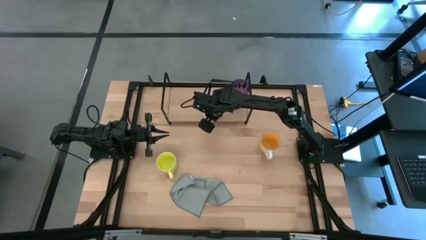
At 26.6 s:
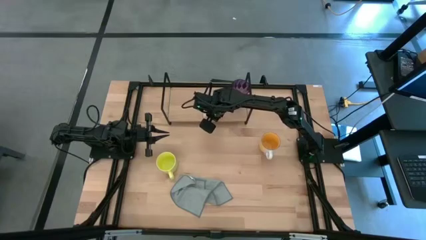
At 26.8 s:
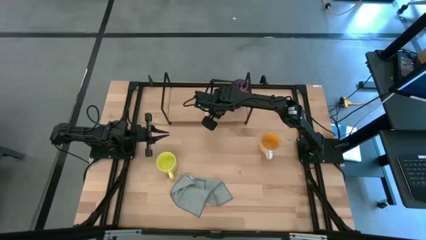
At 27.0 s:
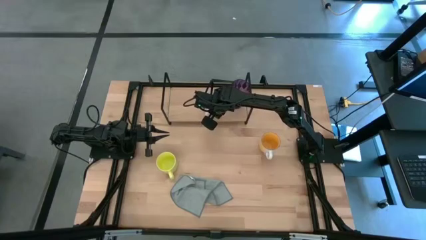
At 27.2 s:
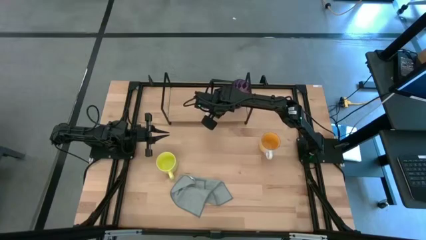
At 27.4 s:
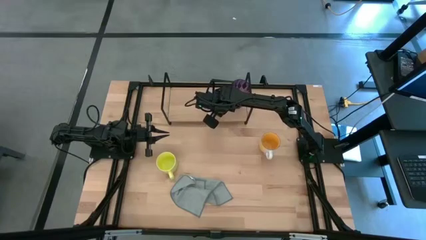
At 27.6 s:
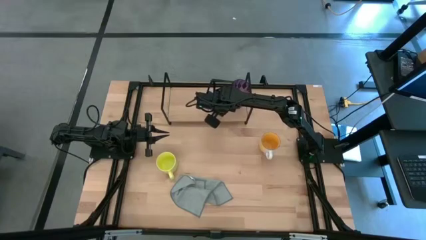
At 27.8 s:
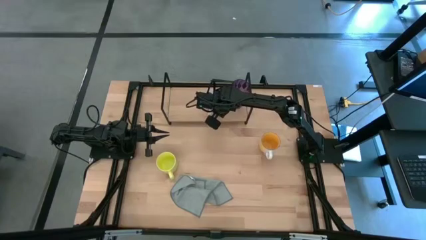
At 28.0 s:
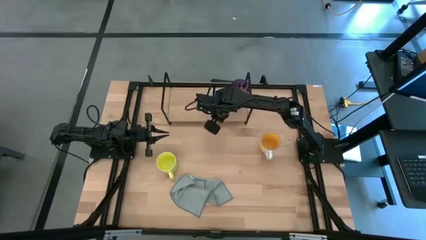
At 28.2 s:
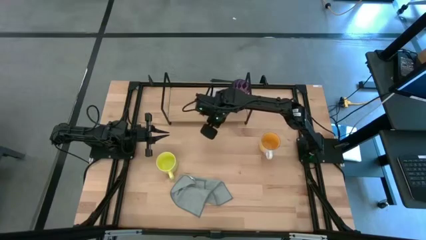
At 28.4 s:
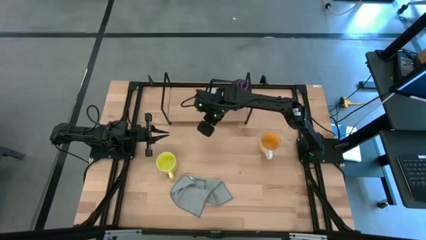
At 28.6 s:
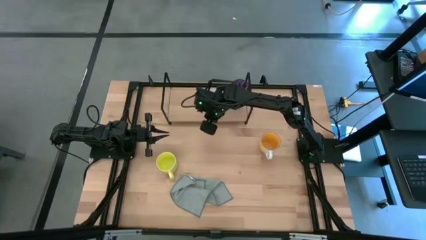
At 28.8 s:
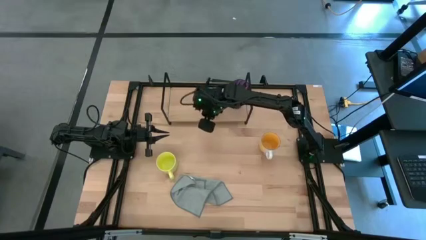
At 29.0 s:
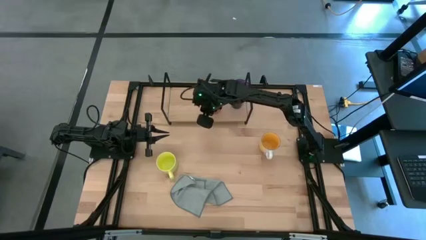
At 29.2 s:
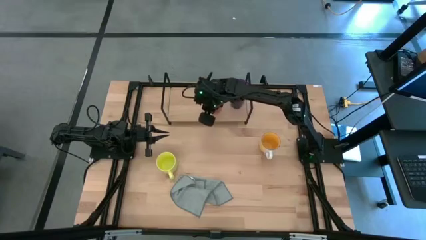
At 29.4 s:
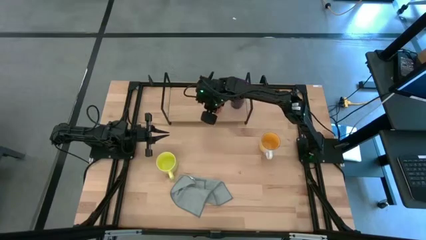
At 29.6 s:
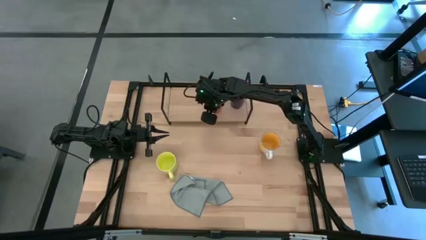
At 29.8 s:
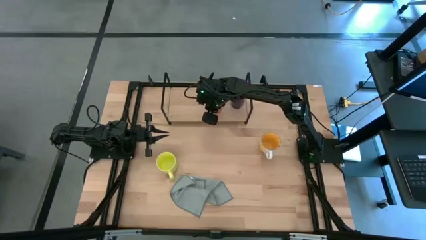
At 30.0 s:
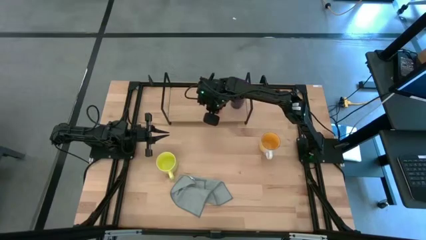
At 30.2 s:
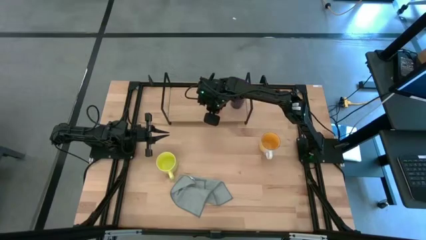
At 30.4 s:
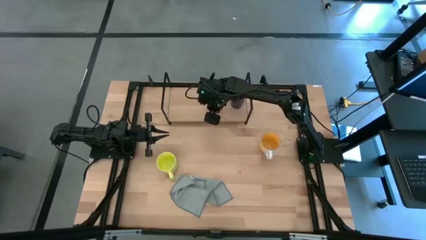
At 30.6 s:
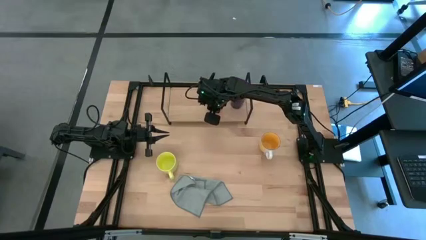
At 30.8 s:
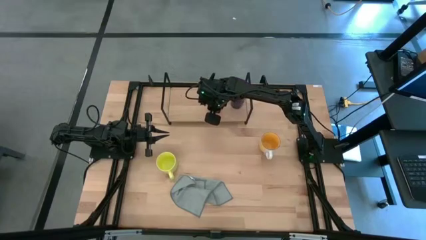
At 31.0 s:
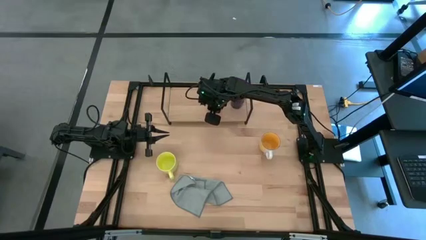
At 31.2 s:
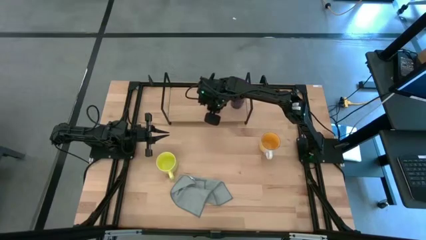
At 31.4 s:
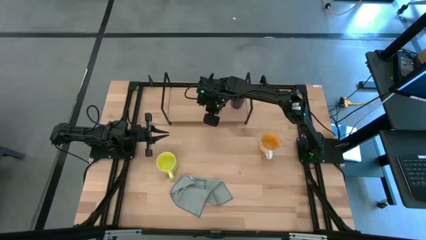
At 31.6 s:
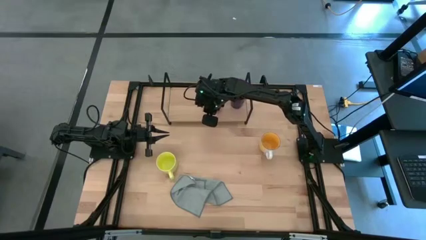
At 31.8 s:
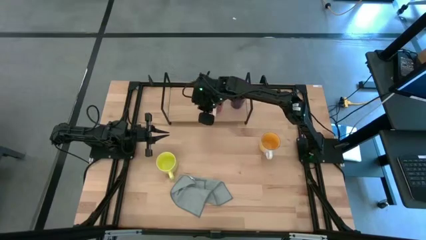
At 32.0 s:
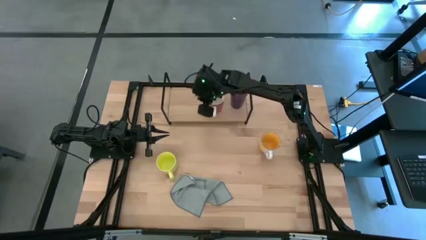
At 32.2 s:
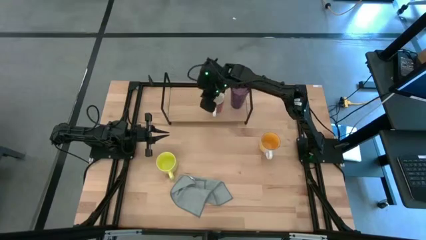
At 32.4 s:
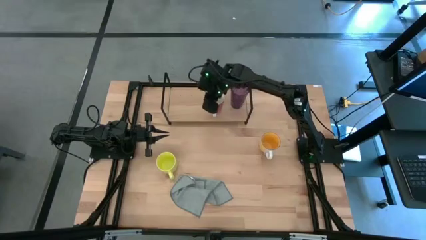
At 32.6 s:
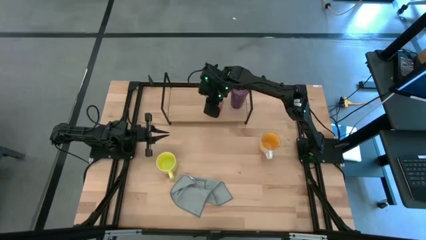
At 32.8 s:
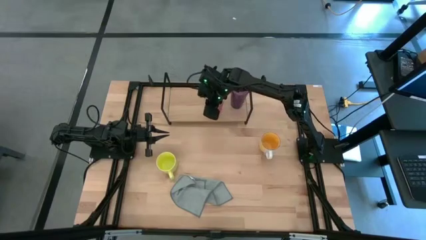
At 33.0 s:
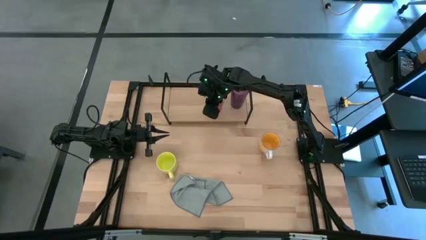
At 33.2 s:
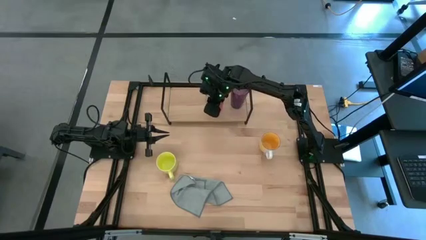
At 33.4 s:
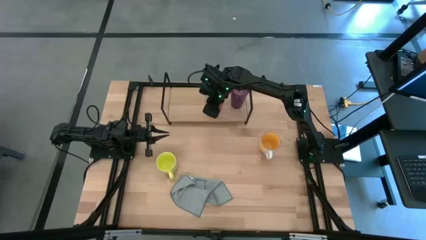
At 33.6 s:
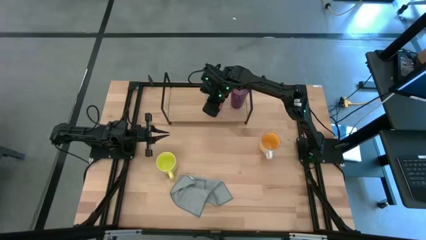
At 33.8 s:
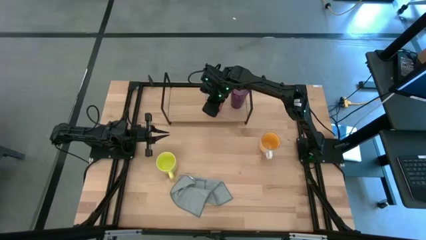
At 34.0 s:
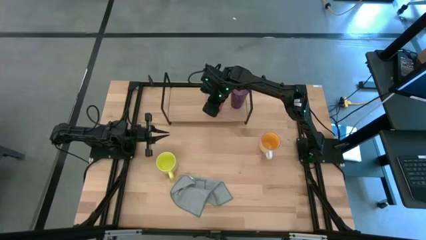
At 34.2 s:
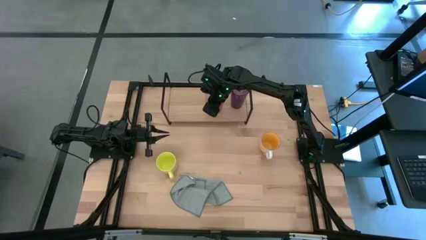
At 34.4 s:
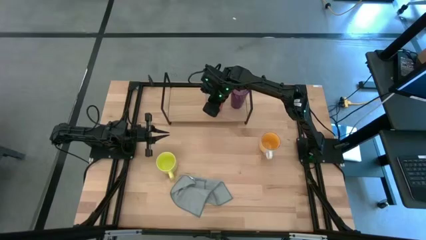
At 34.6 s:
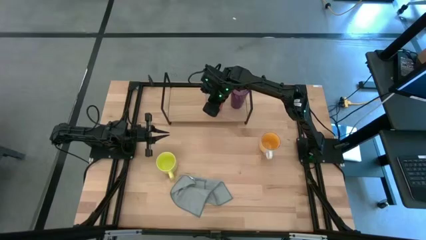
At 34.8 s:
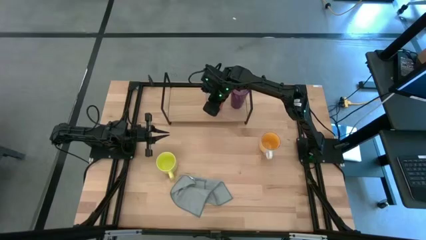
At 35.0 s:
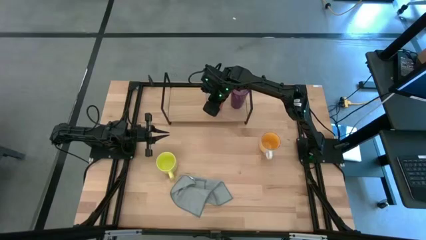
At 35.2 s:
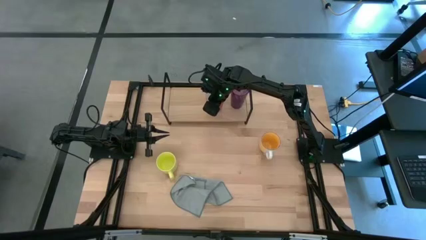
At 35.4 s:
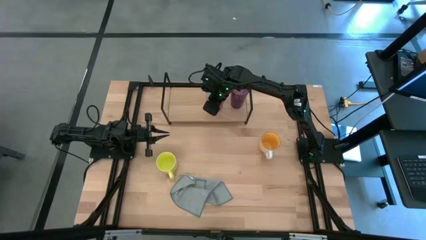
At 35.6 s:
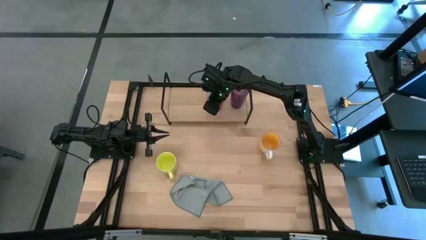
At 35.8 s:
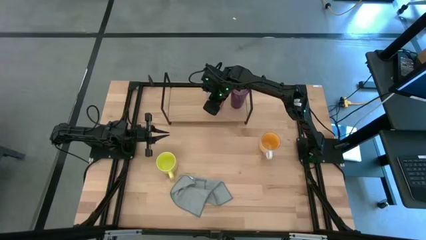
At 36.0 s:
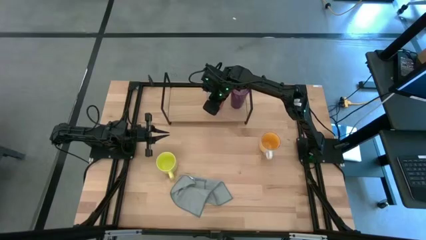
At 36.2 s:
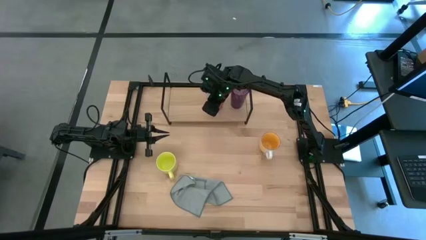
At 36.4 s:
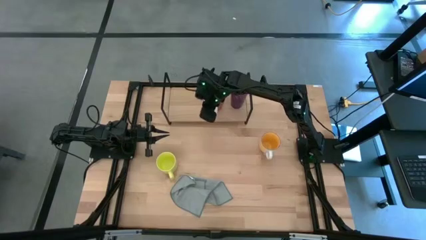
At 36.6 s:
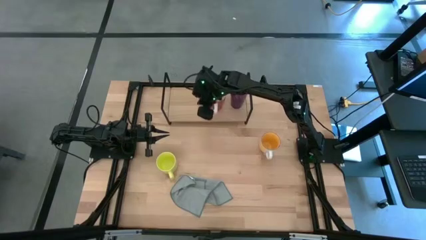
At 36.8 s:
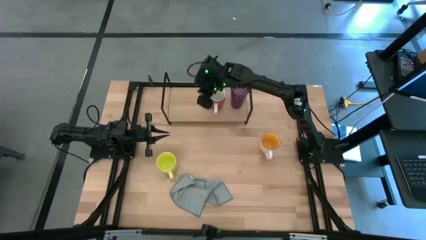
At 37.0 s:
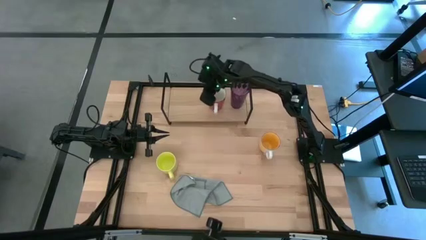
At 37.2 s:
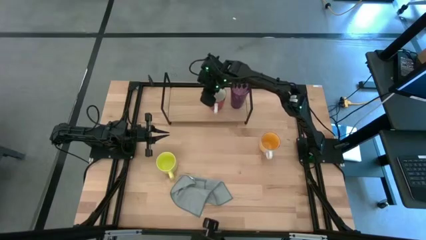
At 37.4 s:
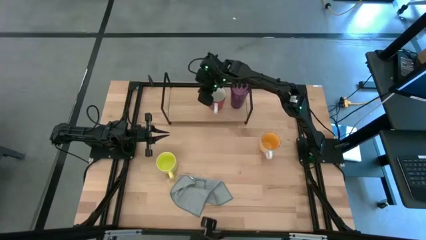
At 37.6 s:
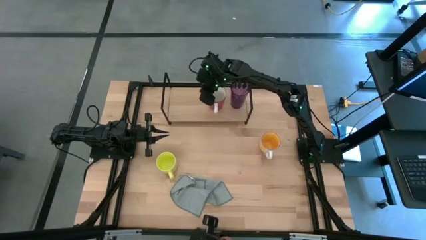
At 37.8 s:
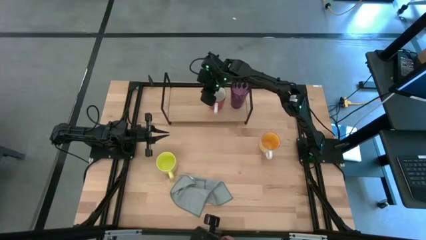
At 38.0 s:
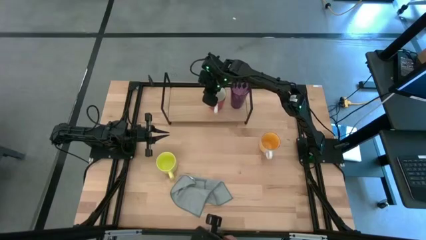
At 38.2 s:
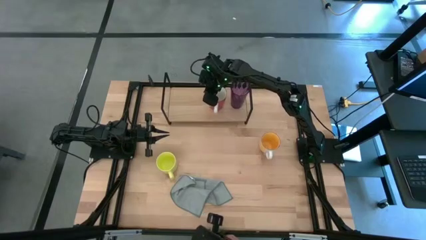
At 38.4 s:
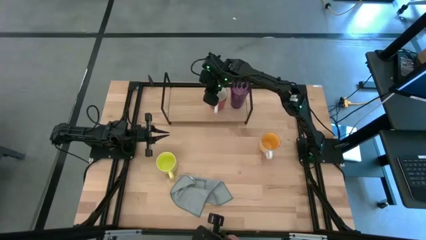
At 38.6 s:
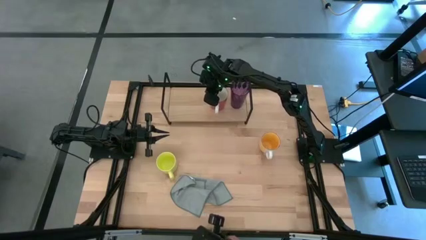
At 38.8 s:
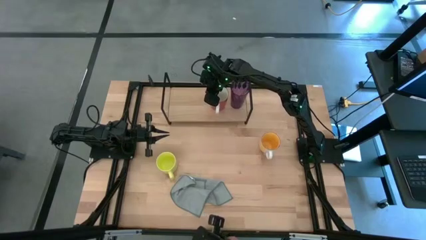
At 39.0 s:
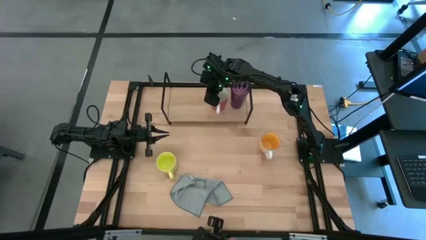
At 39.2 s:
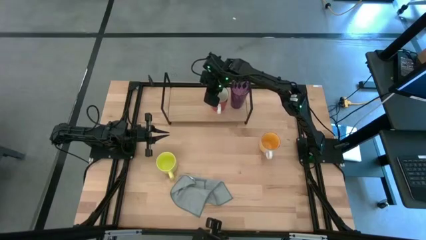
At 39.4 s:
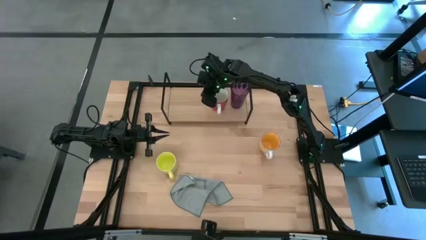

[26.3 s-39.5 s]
Task: Stack small to large cups/mugs on shelf
Put the orange mug on the shelf
